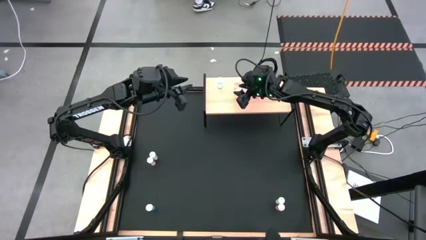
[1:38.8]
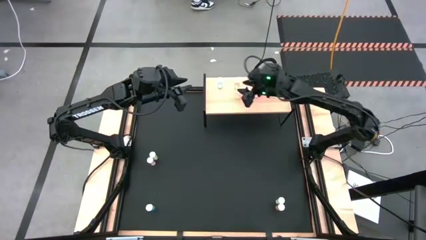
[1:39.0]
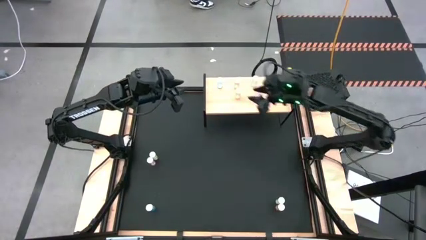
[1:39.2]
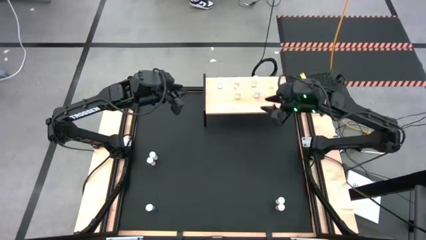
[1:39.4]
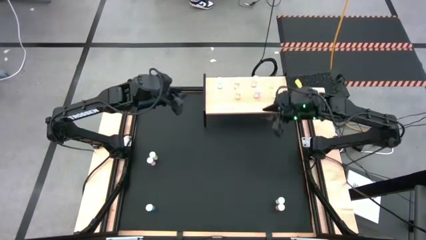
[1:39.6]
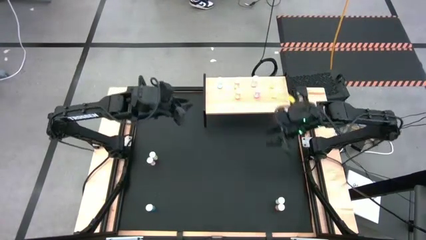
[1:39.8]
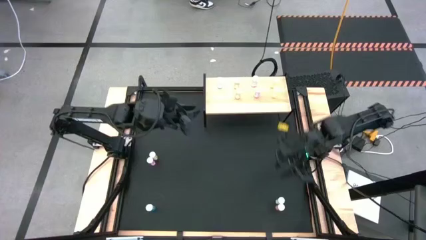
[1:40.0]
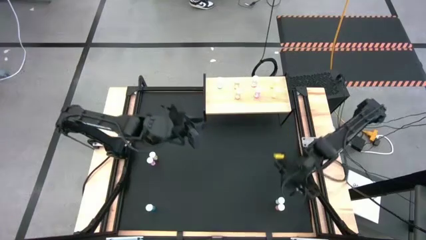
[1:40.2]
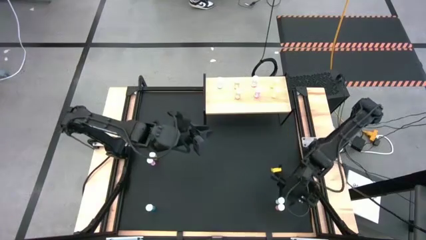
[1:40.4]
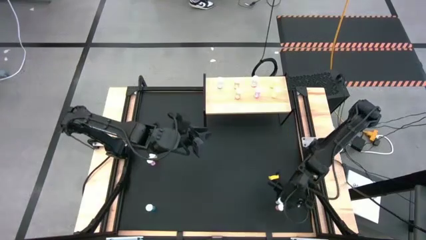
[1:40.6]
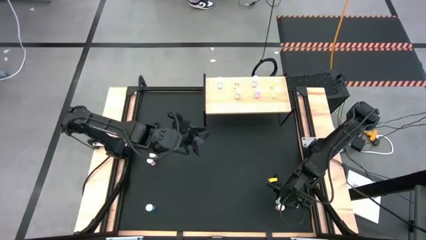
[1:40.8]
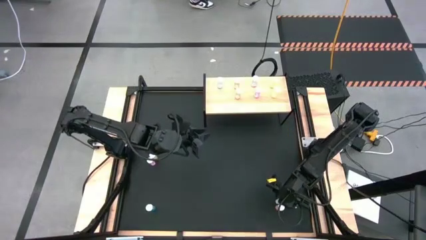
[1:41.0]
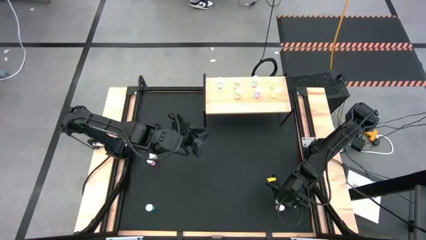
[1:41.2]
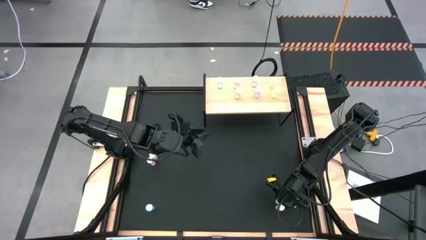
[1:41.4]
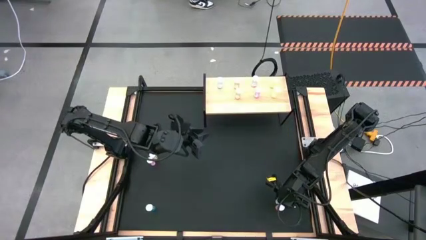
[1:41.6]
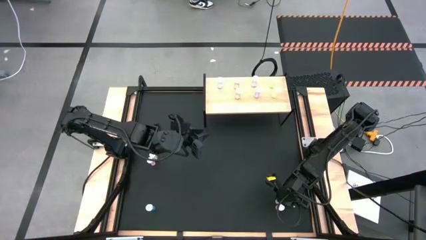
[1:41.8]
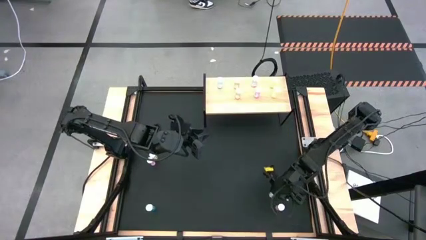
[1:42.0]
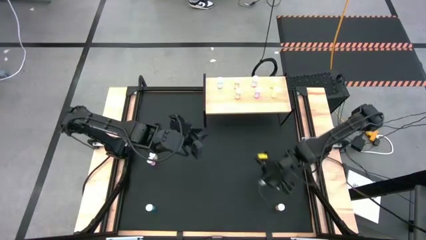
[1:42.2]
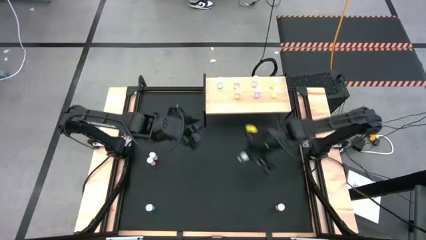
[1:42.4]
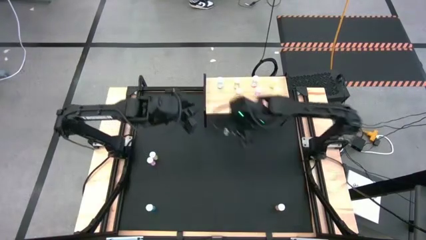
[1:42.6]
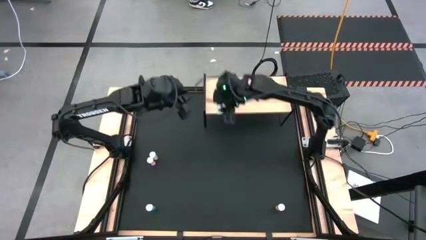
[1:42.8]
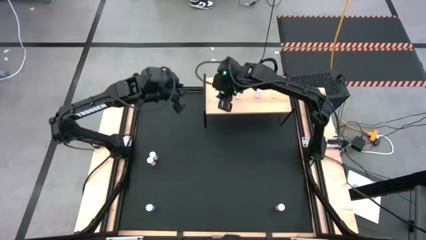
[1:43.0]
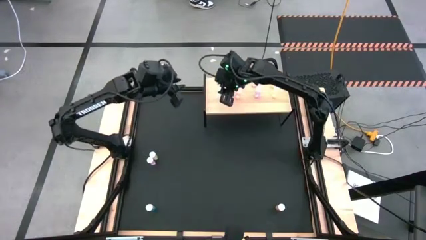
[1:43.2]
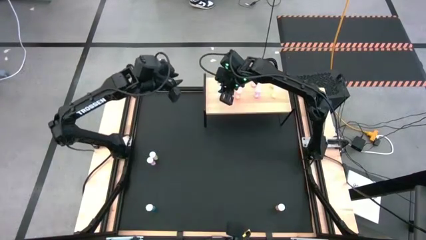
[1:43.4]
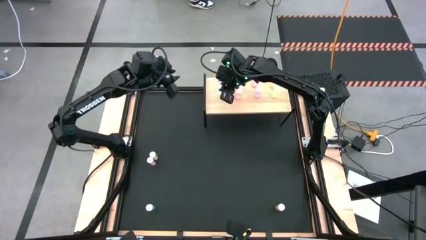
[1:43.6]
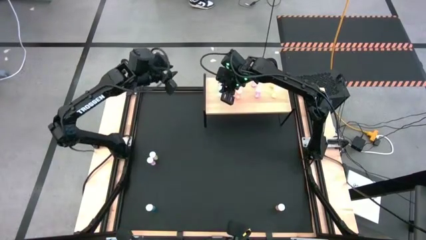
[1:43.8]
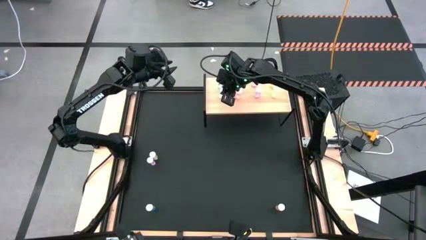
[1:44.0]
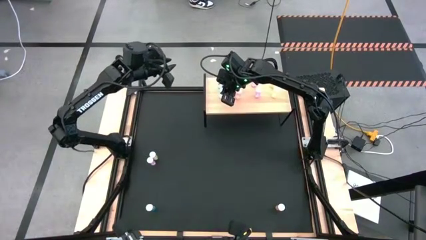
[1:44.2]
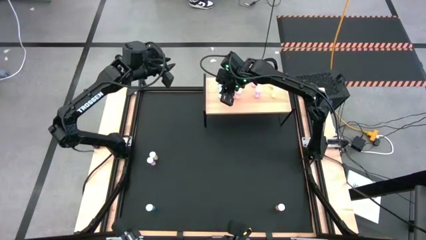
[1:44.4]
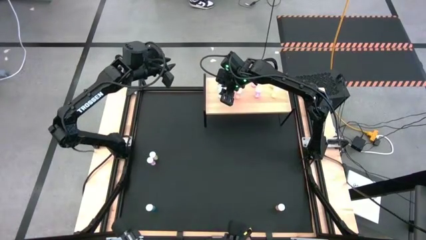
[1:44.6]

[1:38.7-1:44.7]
Task: Pick and place medicine bottles onto shelf by color
Put the right blue pill bottle on the shelf aligned with the other blue pill bottle

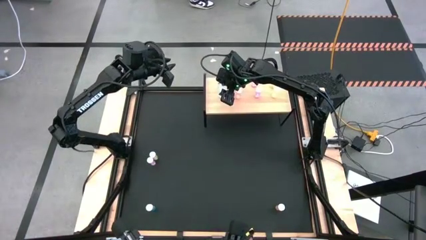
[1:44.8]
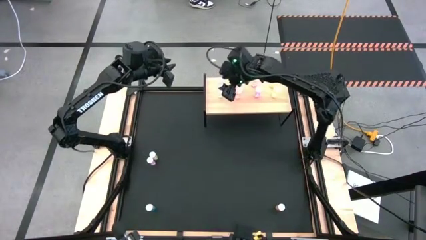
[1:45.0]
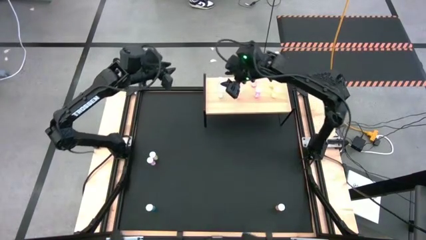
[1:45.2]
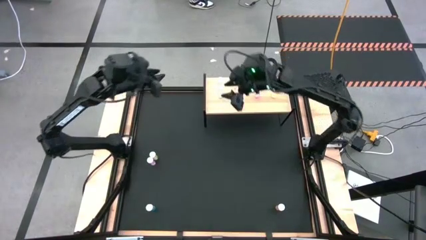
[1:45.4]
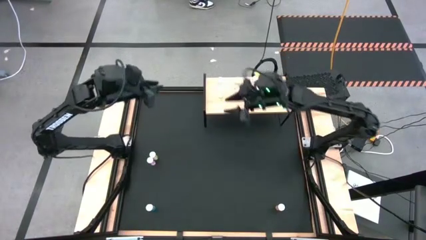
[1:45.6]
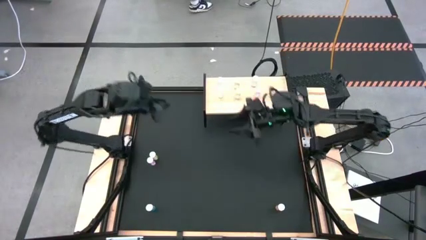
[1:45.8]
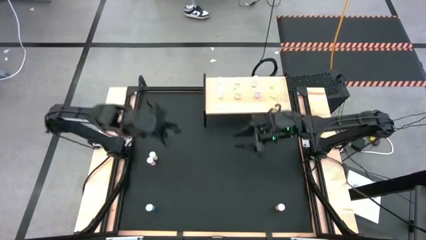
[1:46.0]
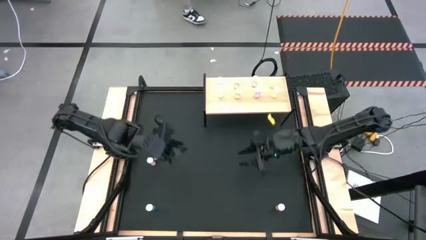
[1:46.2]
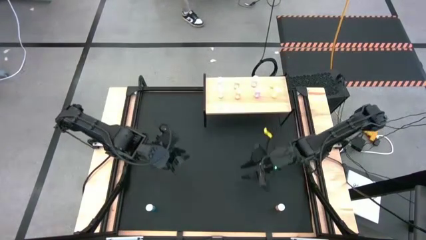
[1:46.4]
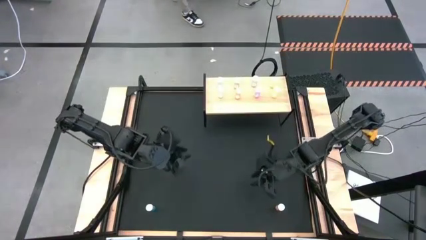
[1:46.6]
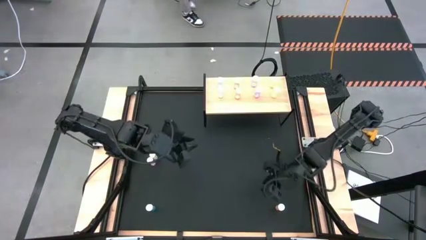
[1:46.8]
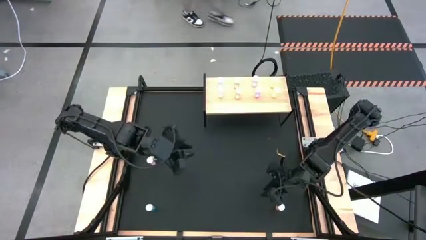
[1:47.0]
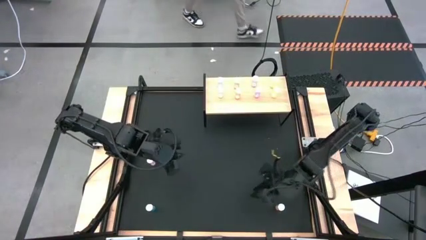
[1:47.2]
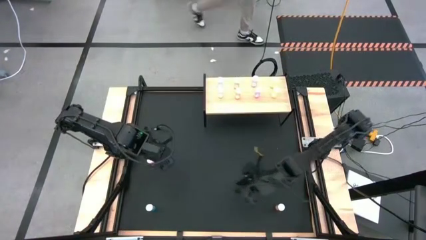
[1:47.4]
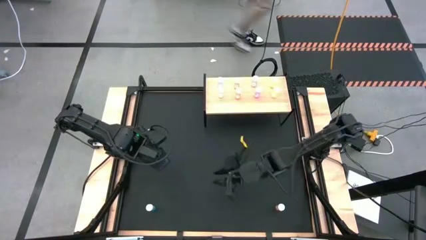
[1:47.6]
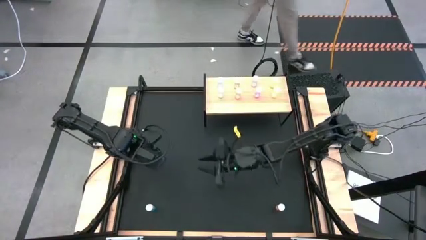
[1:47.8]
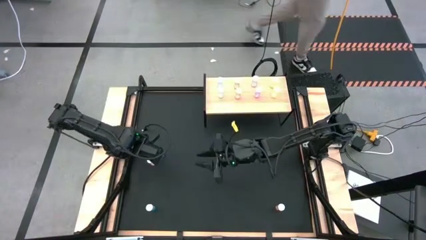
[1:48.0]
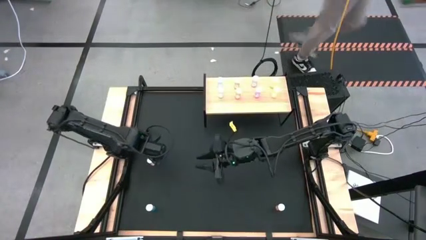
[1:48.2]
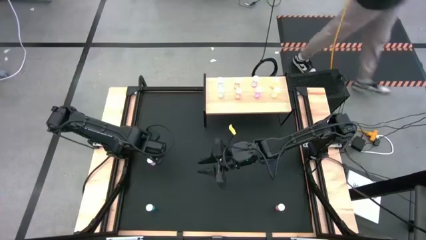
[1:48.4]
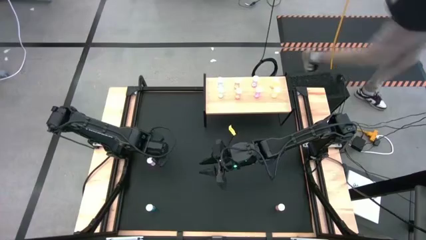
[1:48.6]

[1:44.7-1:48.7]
Put the yellow pill bottle on the shelf aligned with the other yellow pill bottles

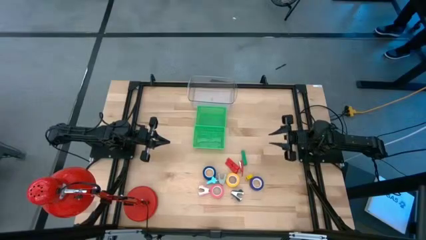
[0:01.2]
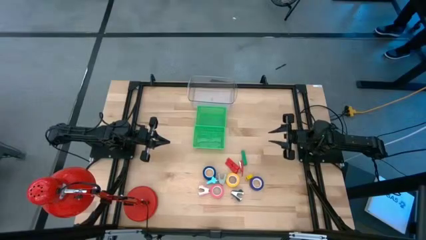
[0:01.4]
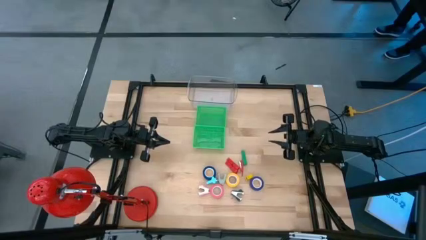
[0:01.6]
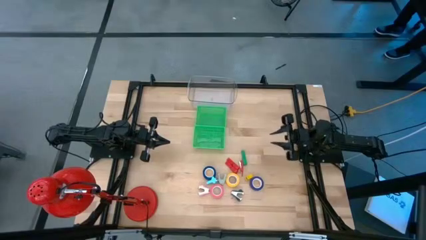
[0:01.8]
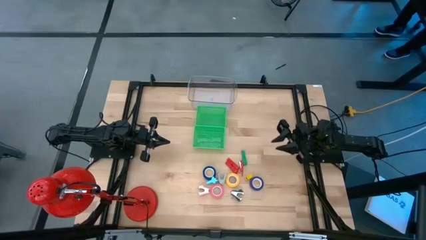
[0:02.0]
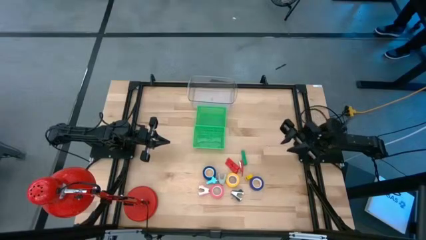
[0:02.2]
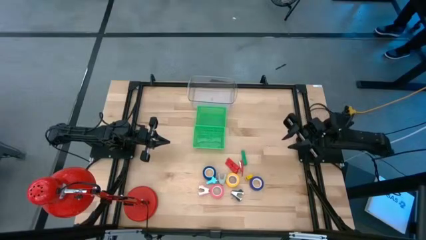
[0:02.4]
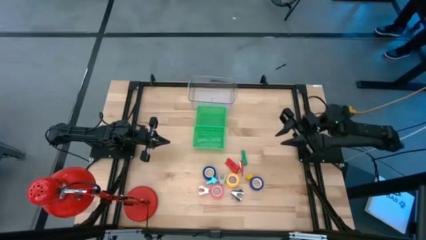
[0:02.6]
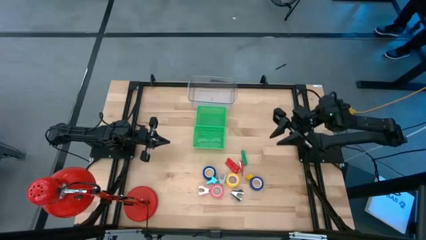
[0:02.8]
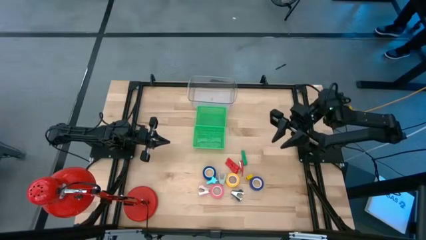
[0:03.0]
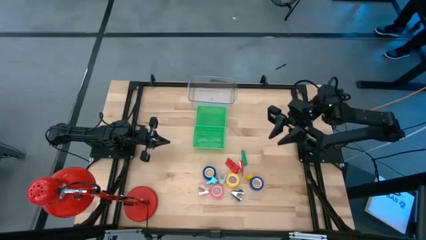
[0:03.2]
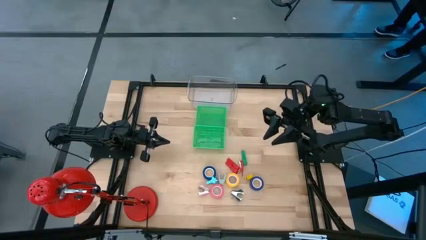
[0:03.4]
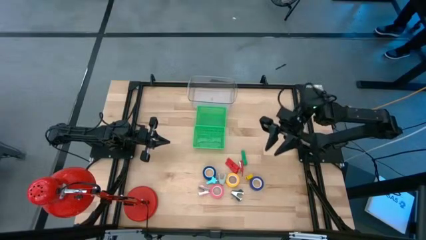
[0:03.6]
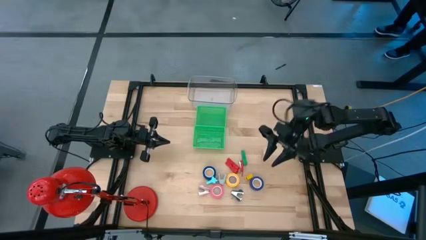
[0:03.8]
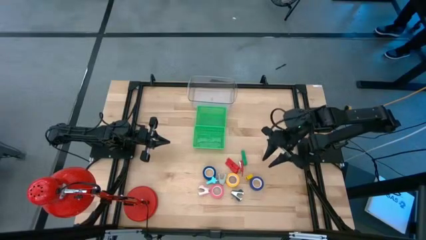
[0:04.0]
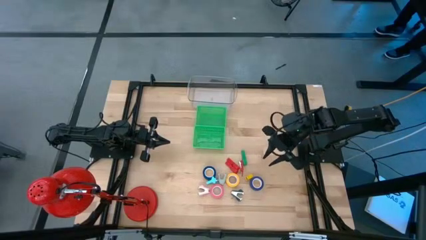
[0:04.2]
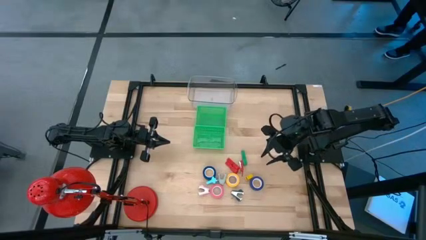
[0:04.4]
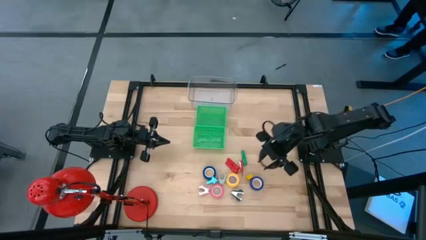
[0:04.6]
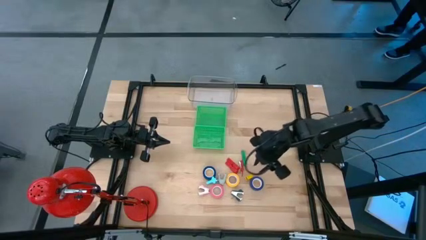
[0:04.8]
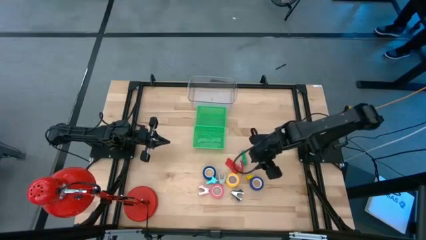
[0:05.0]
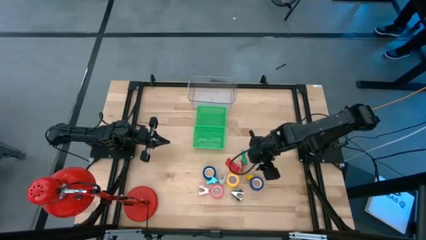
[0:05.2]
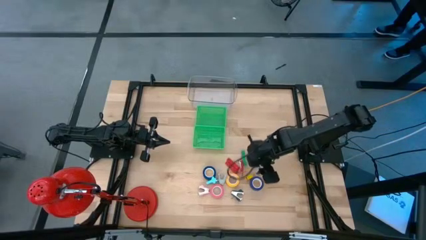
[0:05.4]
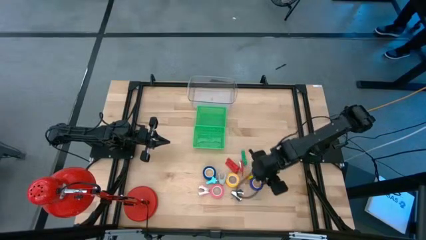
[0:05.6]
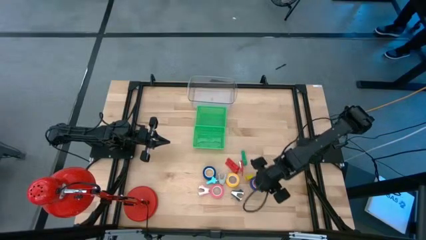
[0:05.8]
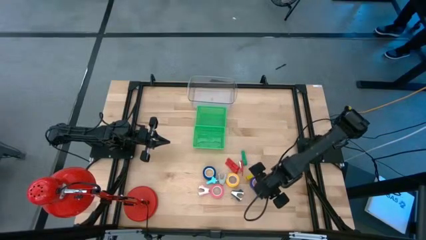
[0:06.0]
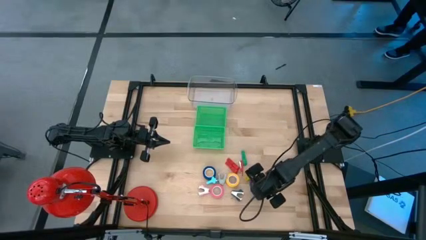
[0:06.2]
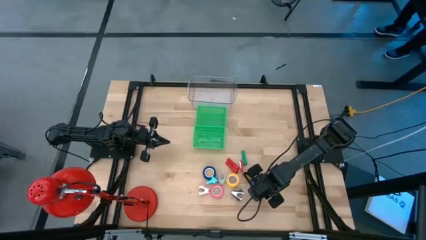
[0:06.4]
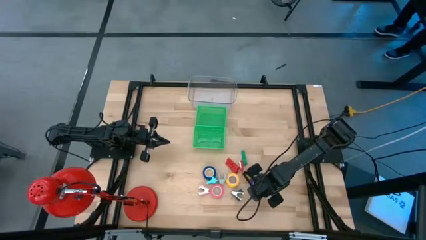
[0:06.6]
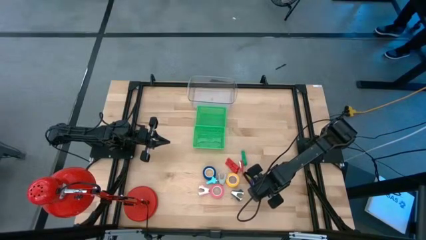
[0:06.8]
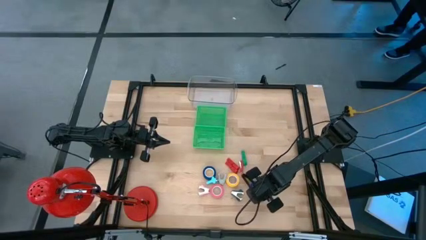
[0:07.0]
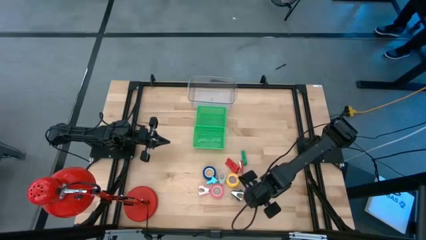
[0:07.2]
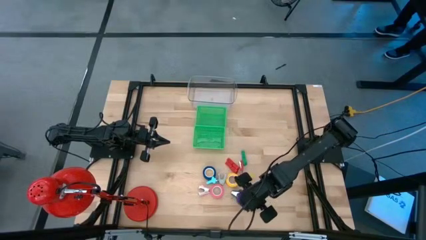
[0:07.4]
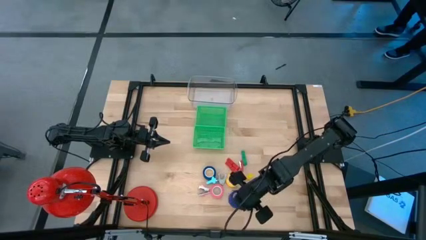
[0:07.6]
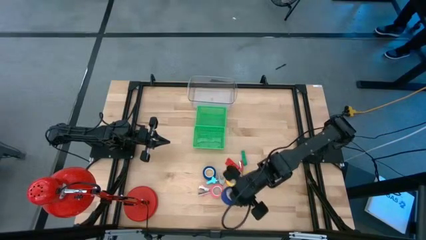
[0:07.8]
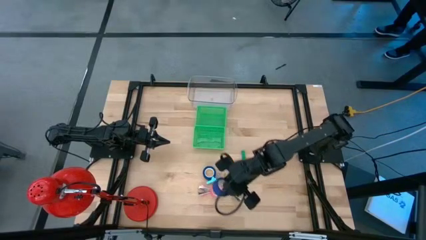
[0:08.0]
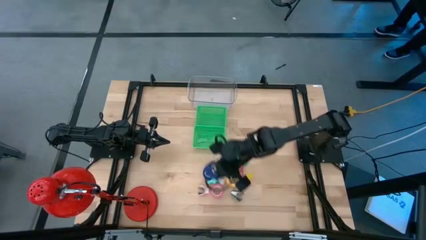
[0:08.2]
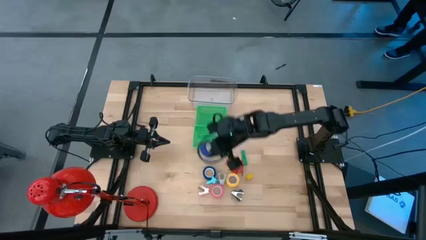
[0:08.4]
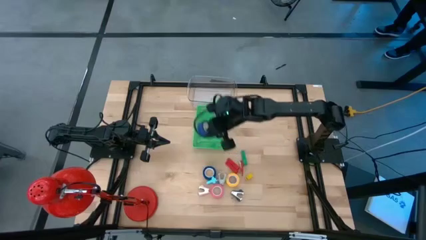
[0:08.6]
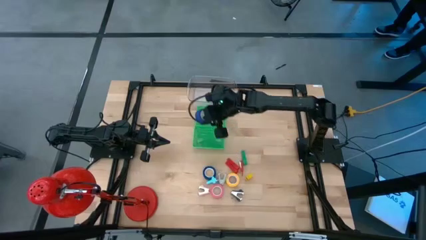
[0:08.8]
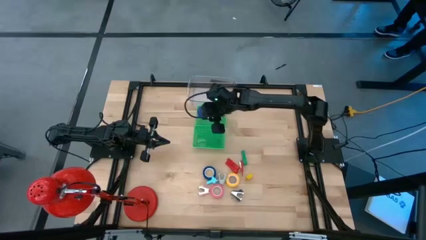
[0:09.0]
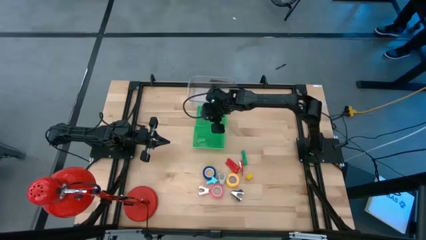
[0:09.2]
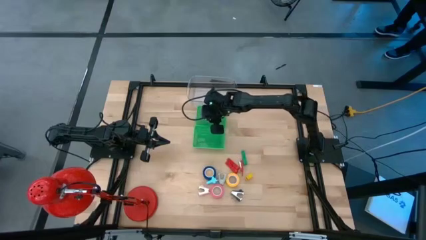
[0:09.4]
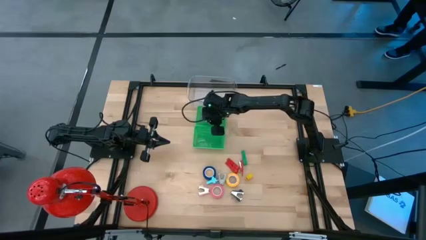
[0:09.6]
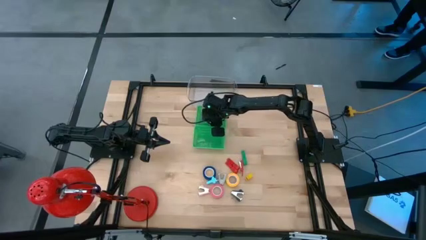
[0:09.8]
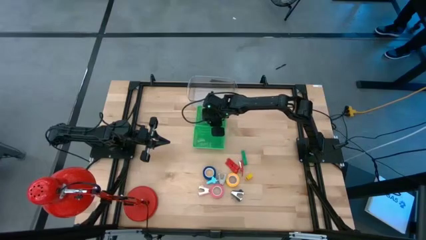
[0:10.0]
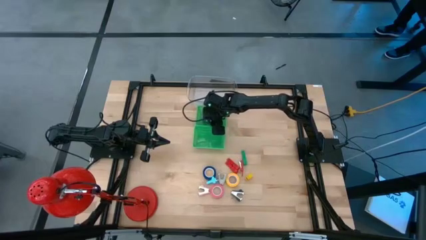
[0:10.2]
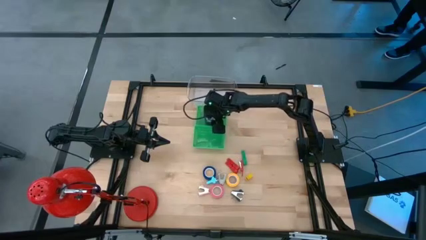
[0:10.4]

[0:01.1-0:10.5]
Task: Pick and place Stapler, Stapler remover, tape
Put the left blue masking tape into the top green bin
